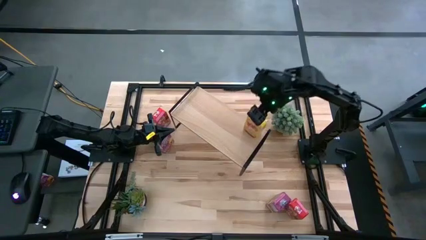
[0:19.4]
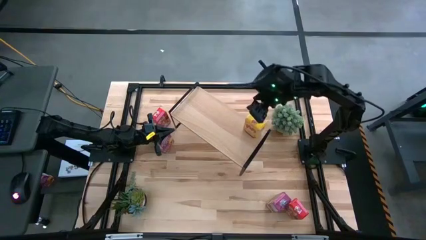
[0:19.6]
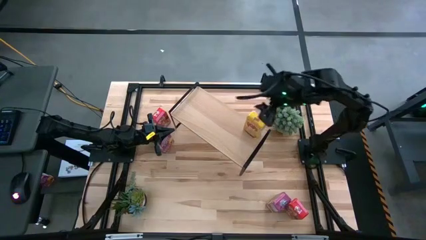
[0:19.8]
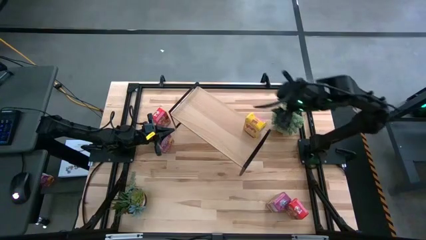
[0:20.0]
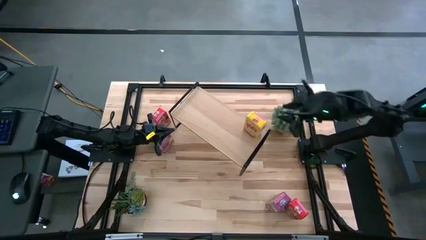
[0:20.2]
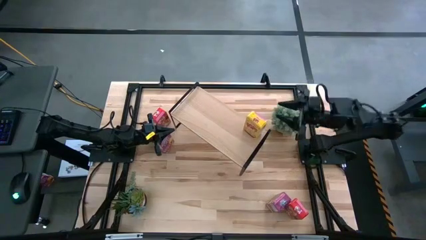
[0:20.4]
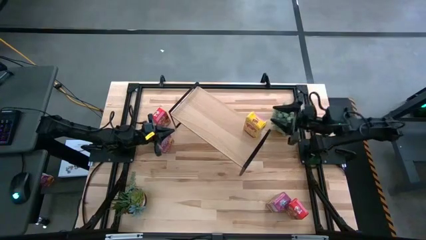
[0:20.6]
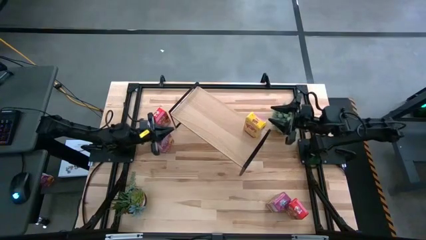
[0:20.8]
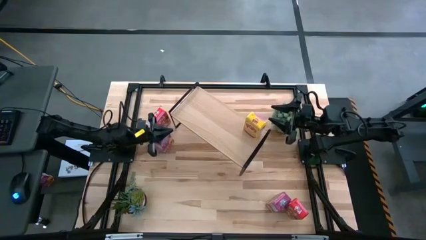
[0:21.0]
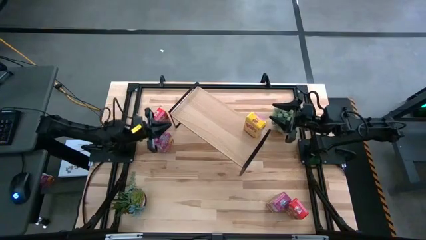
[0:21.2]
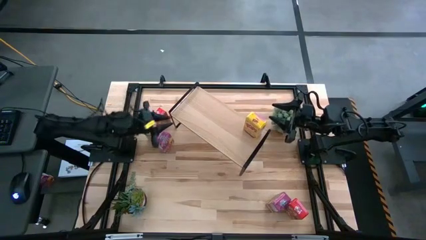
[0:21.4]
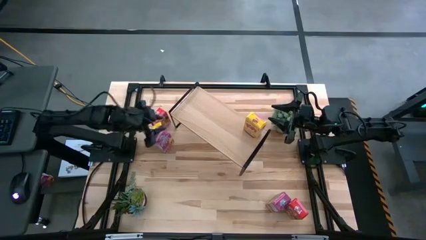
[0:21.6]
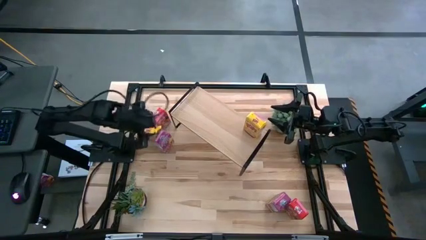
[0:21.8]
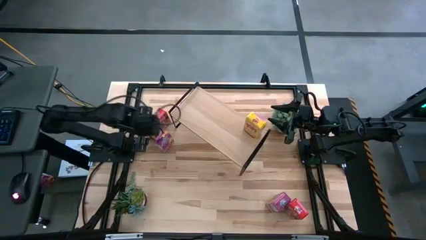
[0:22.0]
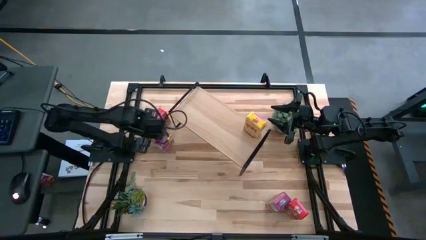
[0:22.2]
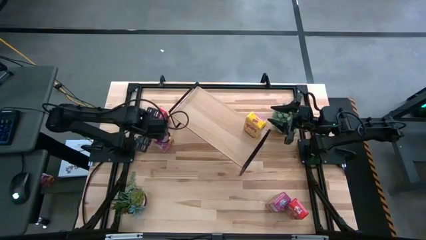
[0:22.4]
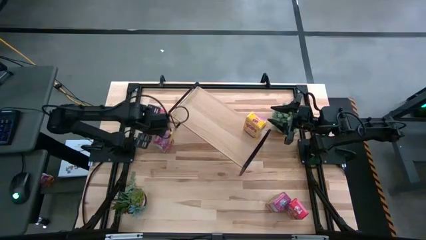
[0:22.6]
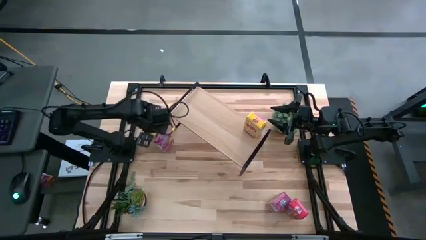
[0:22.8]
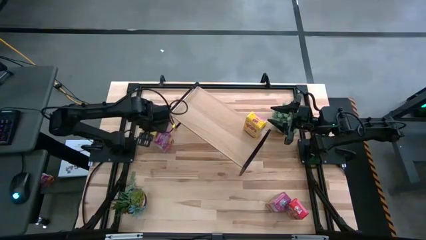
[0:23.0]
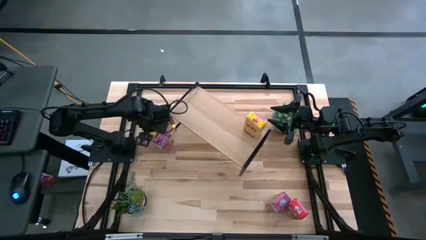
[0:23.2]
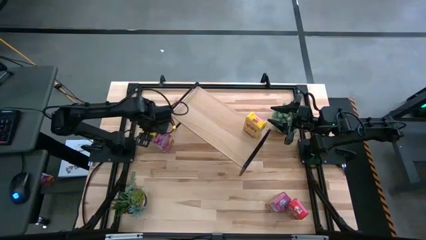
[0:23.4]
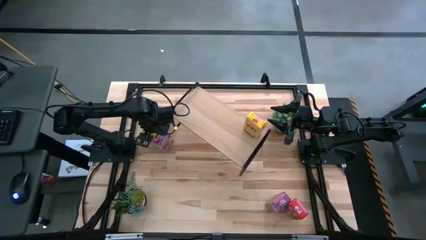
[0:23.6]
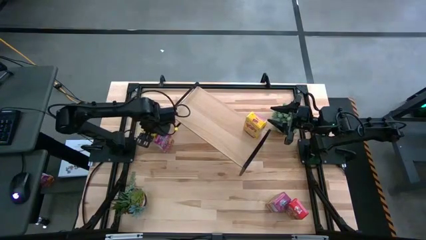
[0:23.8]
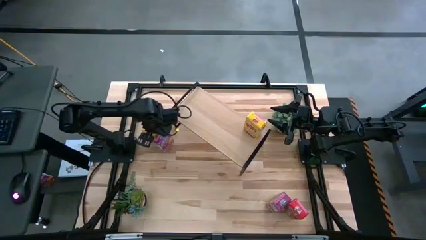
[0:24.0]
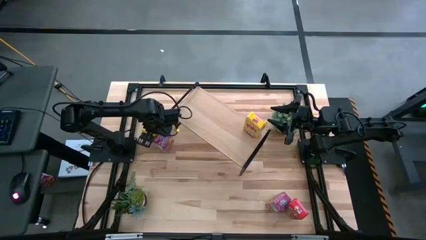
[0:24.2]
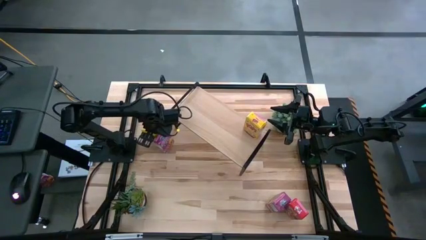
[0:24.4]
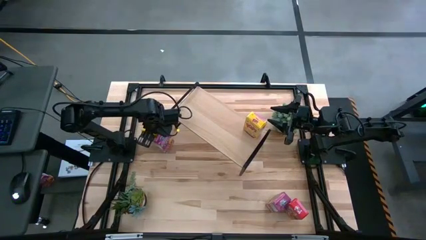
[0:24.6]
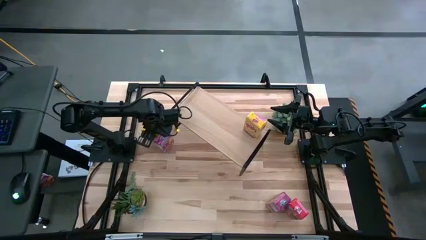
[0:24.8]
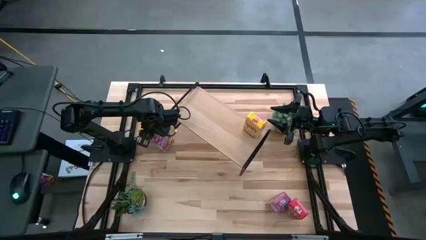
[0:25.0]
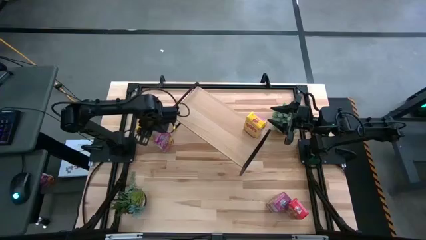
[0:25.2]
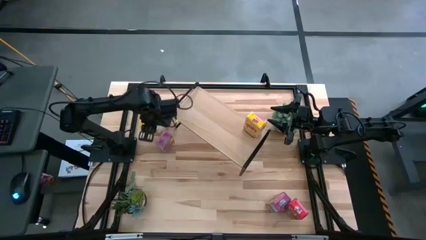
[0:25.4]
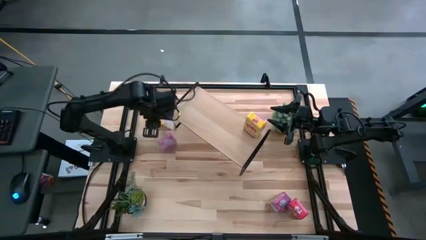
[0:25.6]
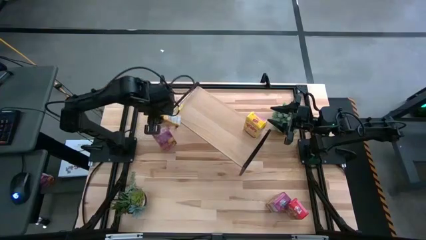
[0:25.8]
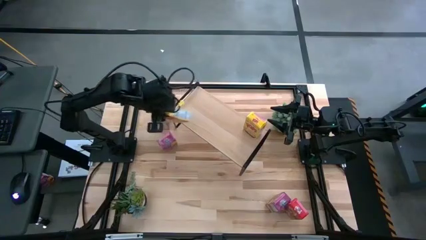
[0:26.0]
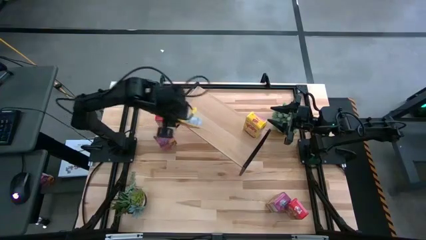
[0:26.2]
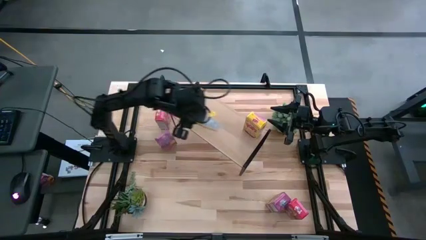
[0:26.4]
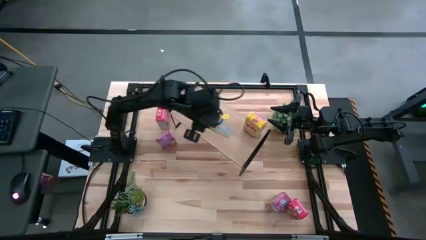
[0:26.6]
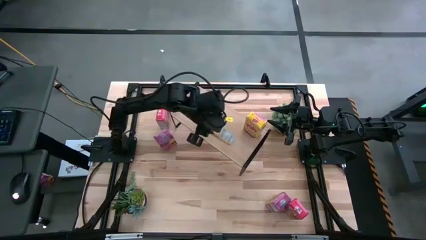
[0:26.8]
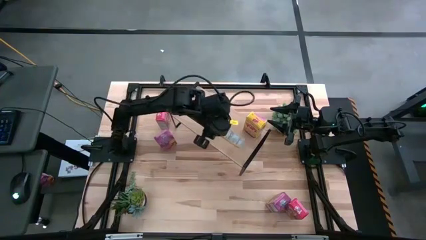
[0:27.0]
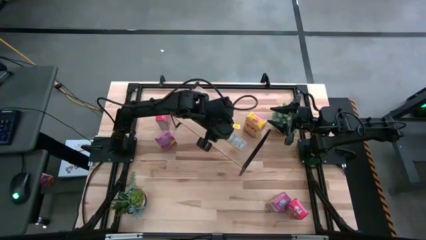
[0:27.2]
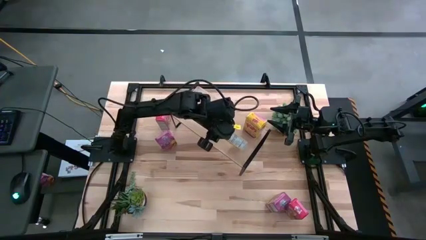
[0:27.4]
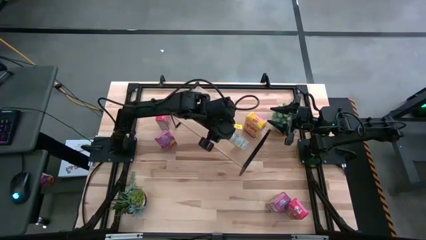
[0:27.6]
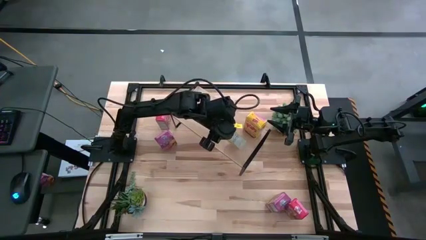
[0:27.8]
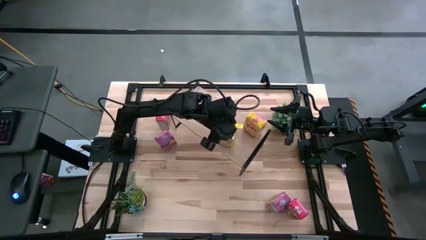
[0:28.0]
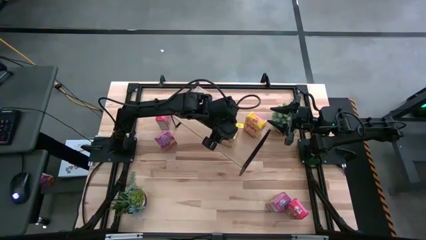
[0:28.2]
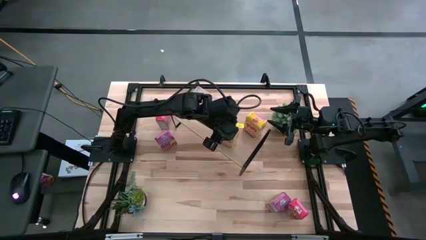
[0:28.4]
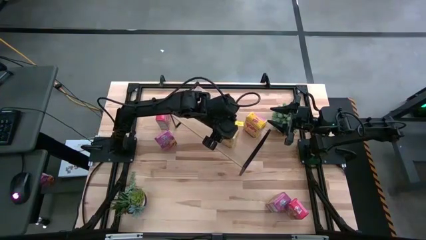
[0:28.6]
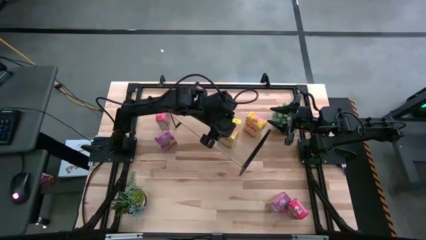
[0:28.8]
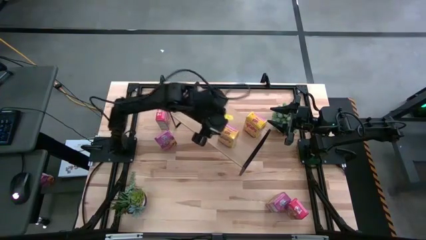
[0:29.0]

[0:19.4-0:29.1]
Task: Stack cereal on shelf
Put the yellow cereal box on the shelf

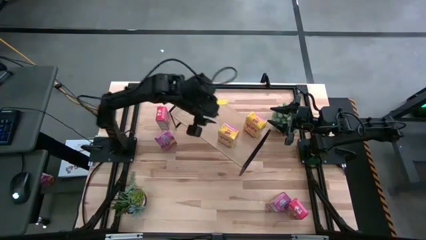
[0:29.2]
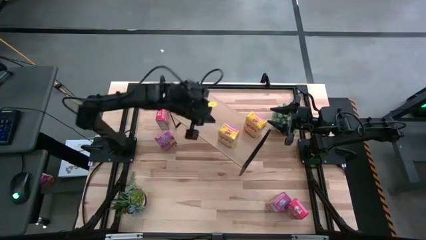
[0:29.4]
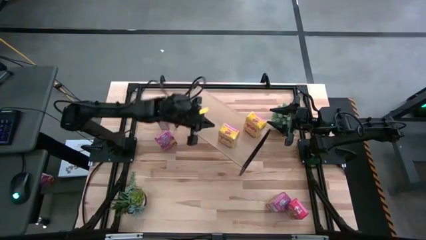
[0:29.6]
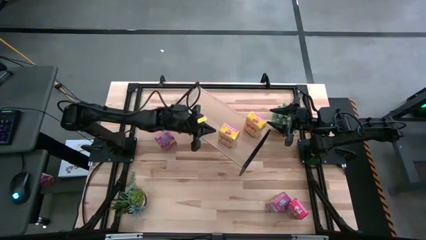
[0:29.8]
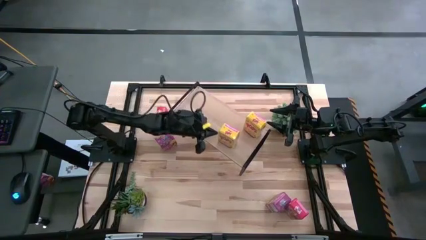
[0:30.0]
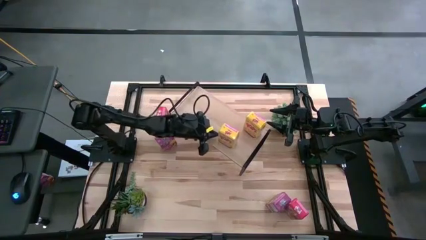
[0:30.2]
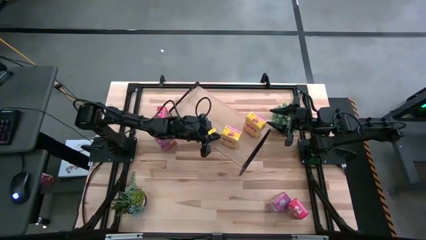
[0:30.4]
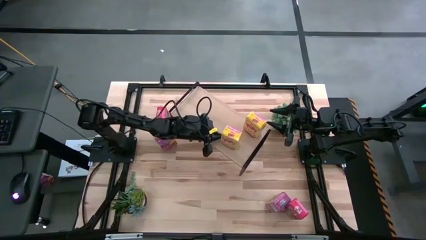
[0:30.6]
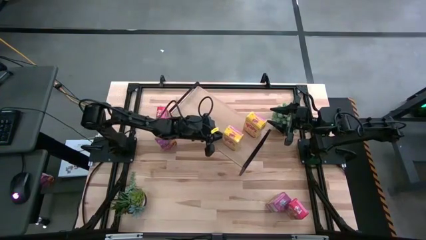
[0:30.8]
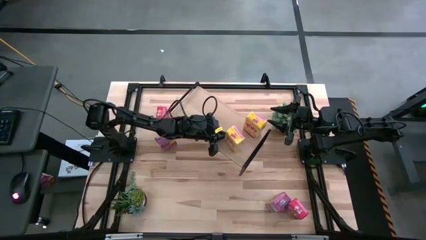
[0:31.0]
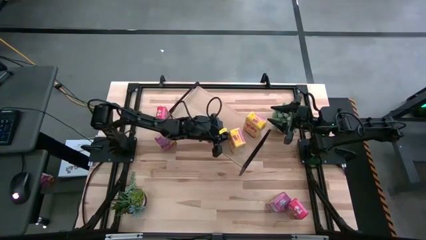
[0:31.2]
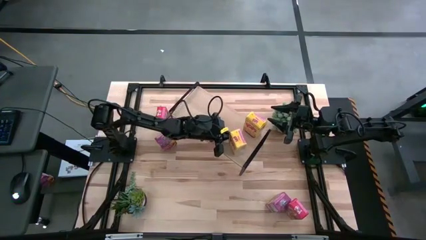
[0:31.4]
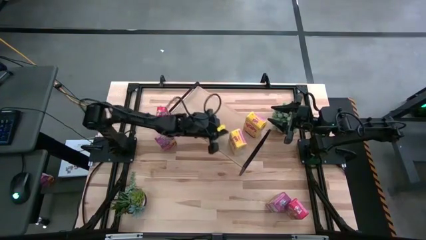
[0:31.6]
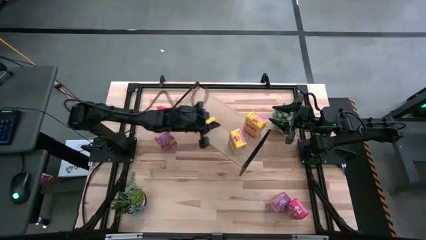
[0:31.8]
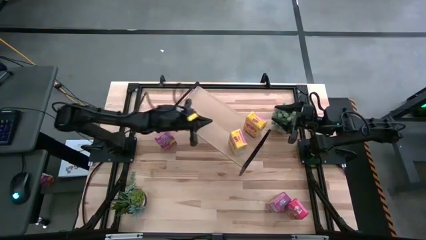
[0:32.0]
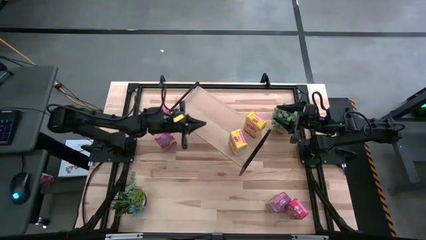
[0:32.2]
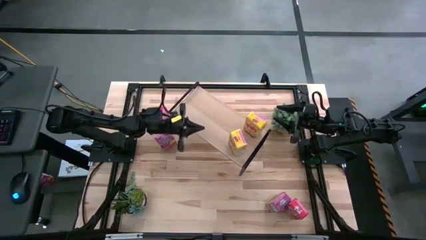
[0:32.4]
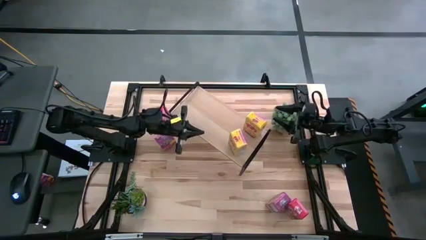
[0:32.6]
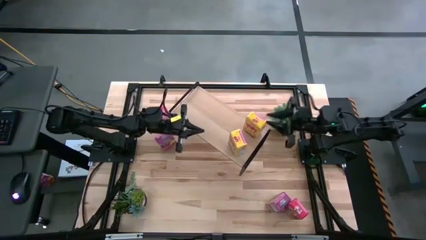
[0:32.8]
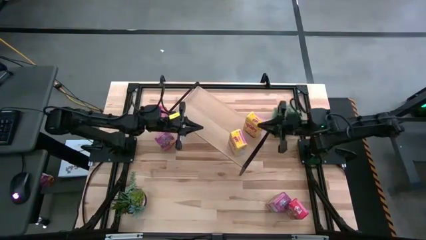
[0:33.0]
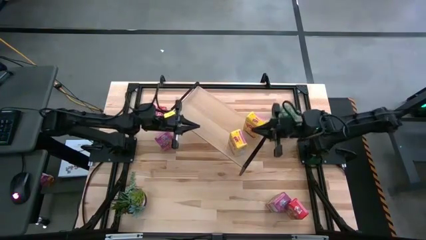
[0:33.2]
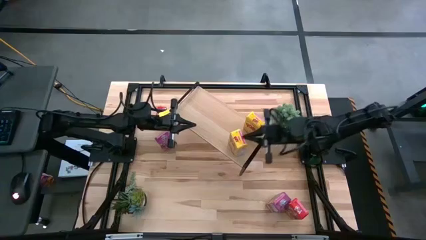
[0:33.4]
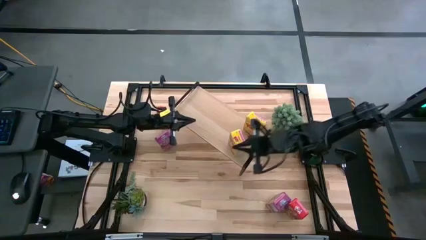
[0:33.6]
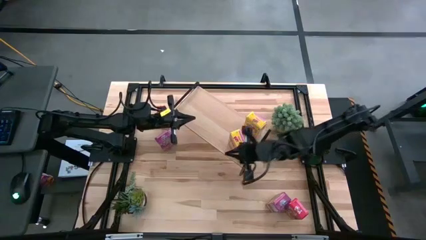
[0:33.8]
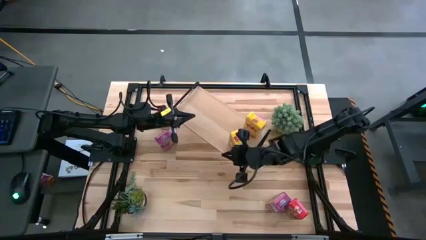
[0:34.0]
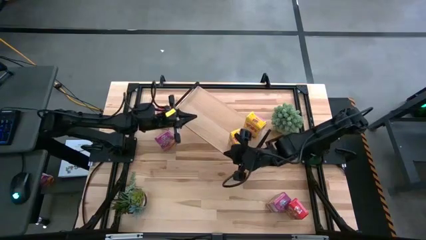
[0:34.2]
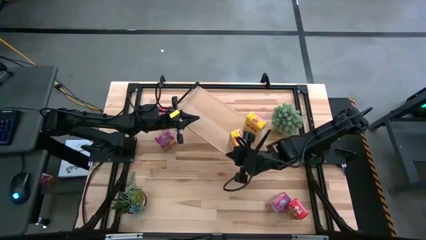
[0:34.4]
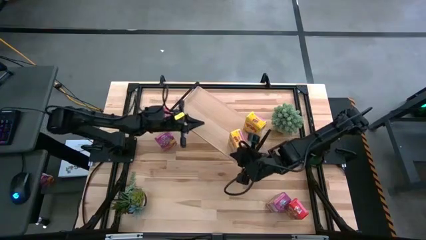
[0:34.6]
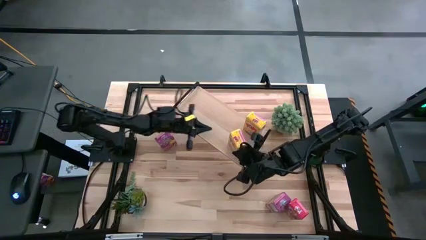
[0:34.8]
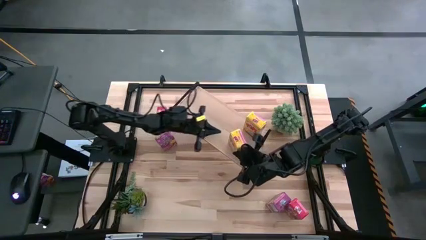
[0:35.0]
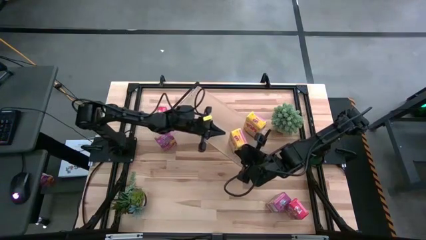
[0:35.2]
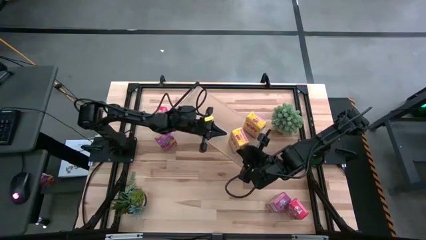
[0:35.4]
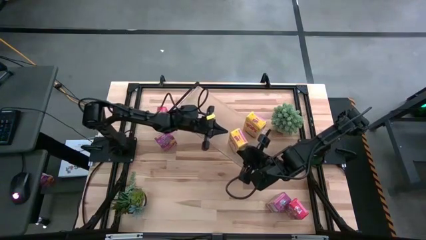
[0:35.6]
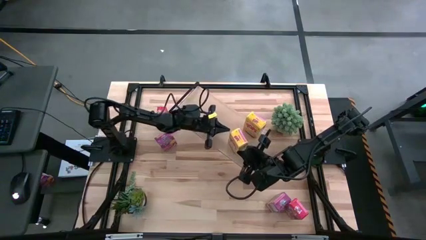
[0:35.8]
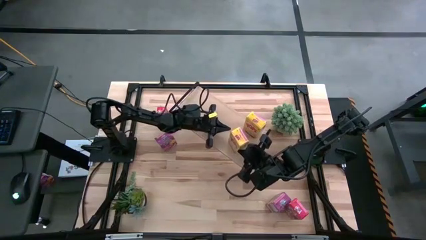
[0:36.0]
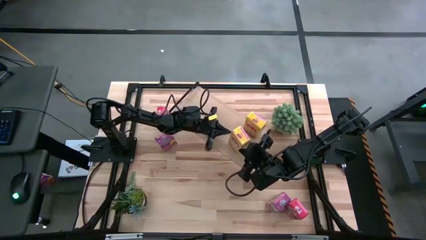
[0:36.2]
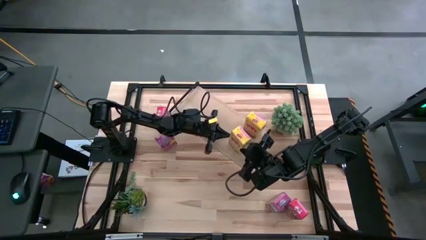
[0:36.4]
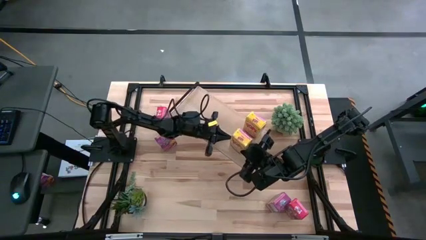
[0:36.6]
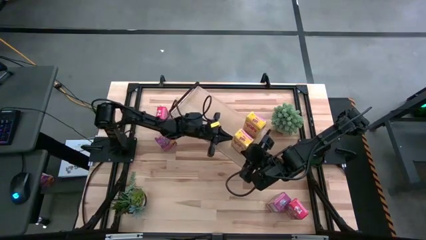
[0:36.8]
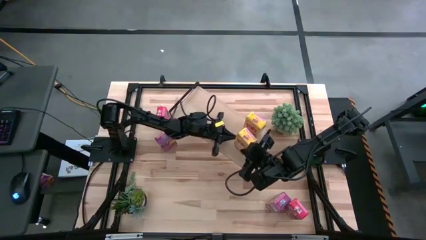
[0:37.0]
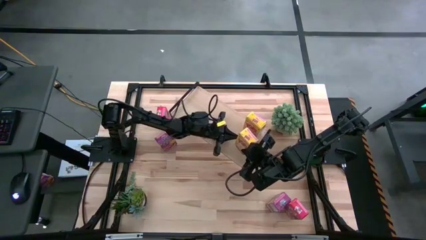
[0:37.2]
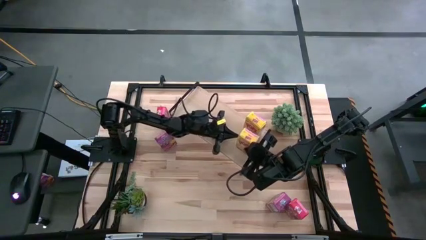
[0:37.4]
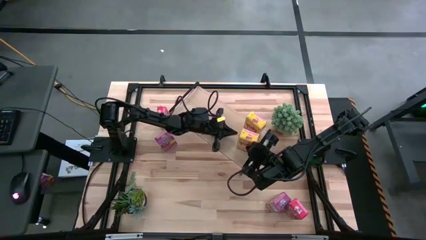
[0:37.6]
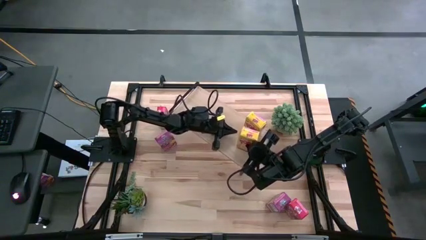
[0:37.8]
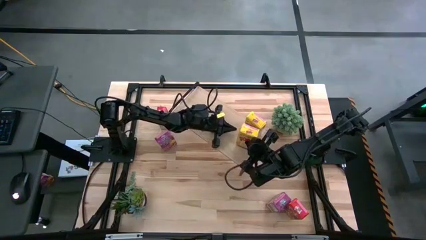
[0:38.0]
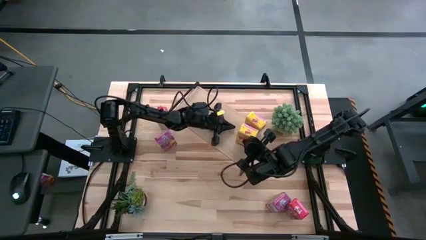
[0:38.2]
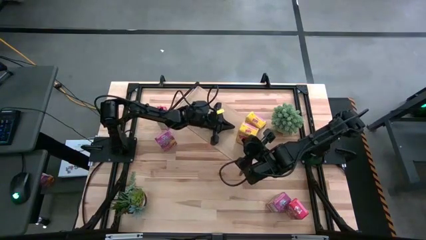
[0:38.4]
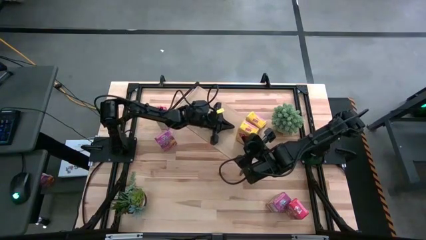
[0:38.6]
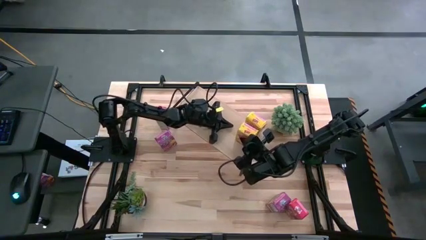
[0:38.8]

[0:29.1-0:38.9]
Put the yellow cereal box on the shelf
